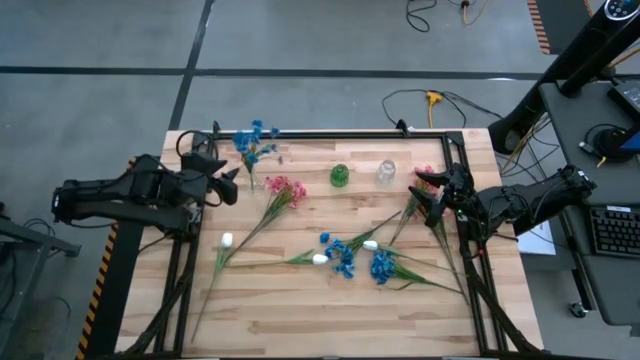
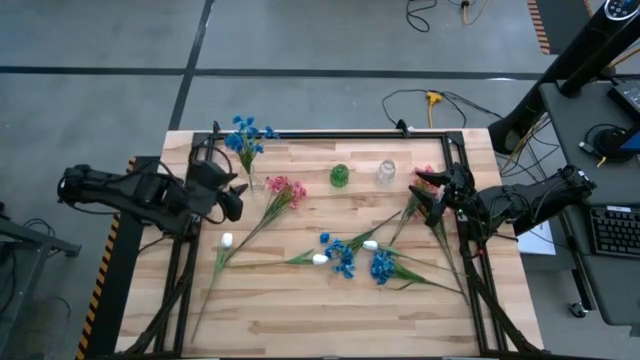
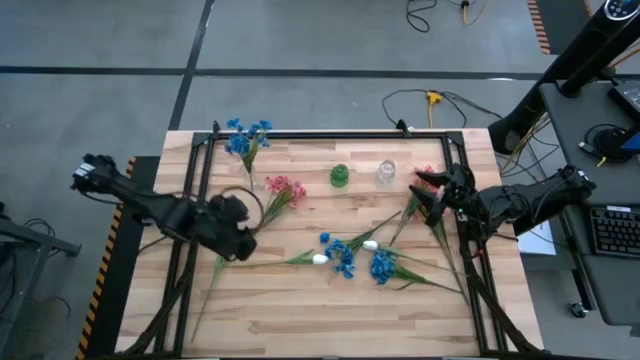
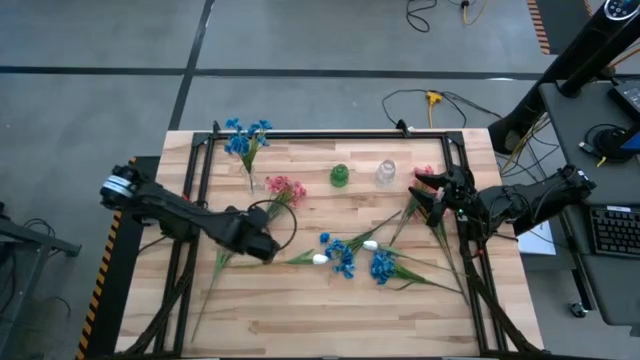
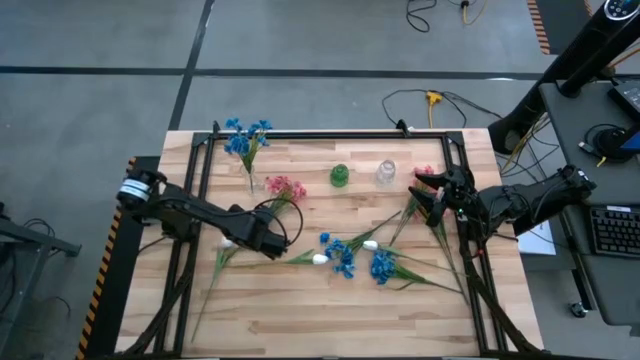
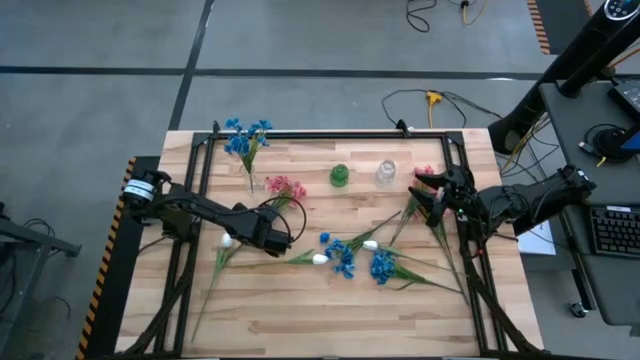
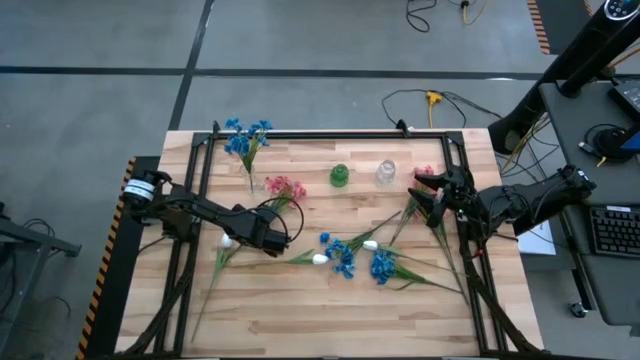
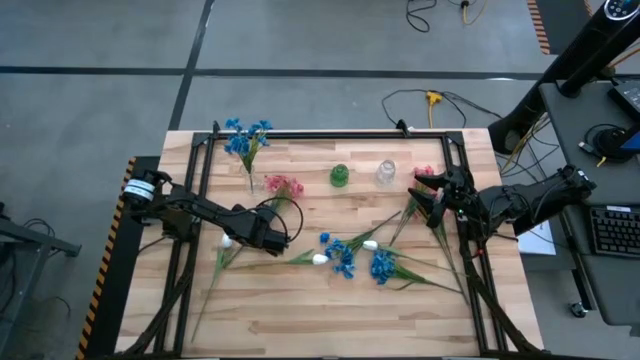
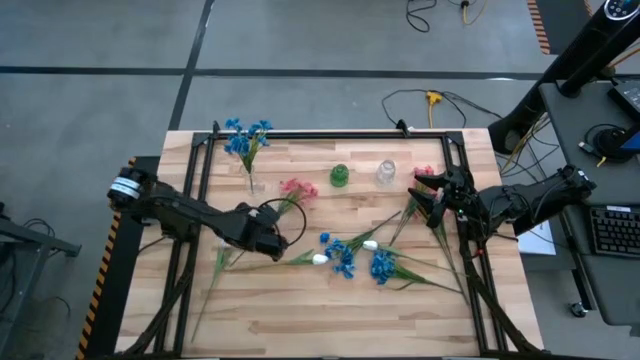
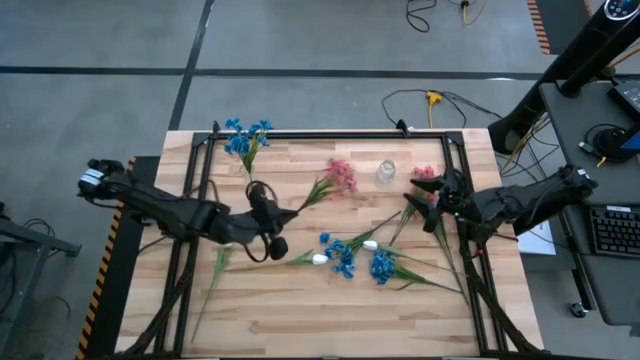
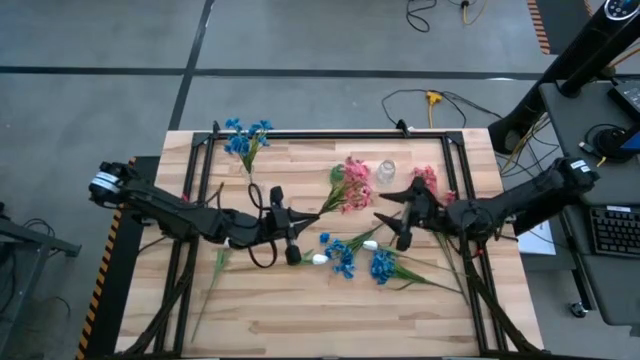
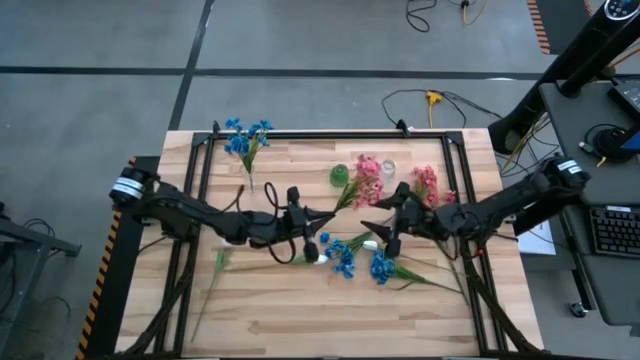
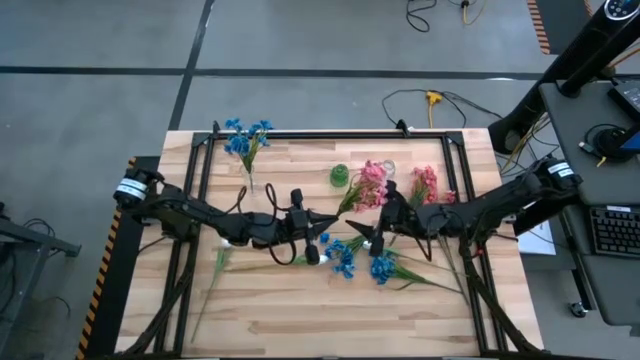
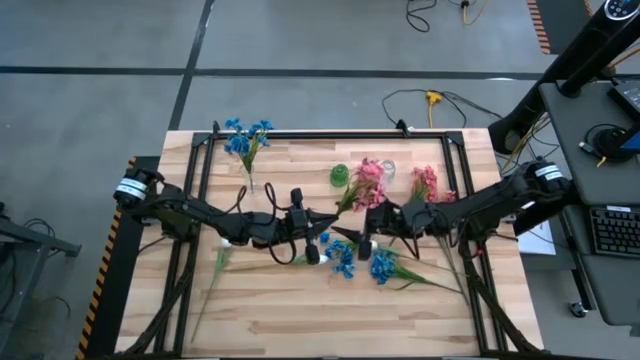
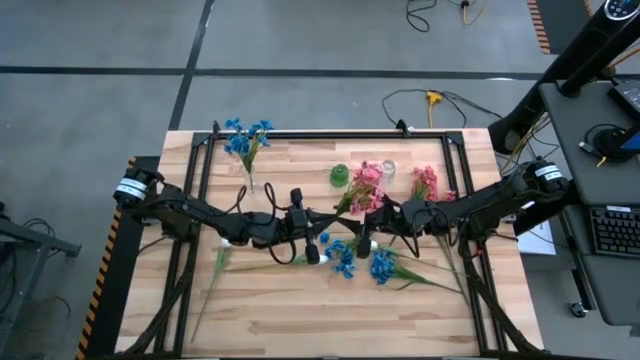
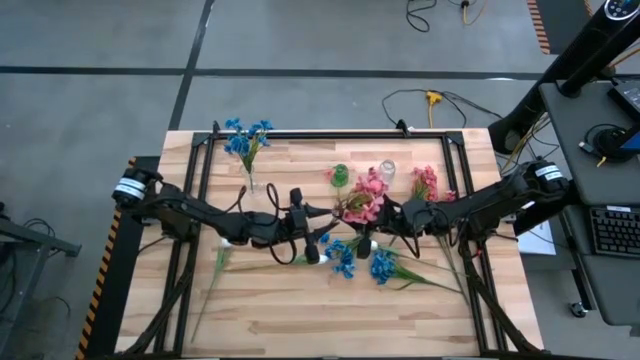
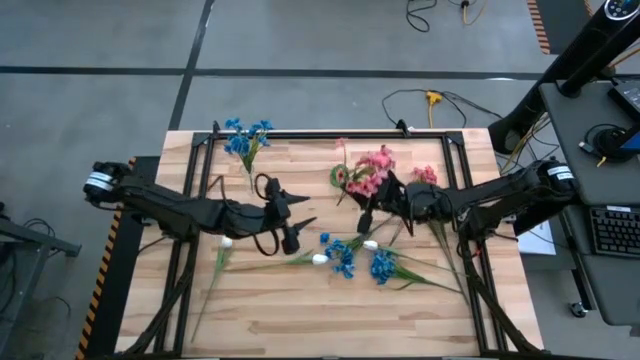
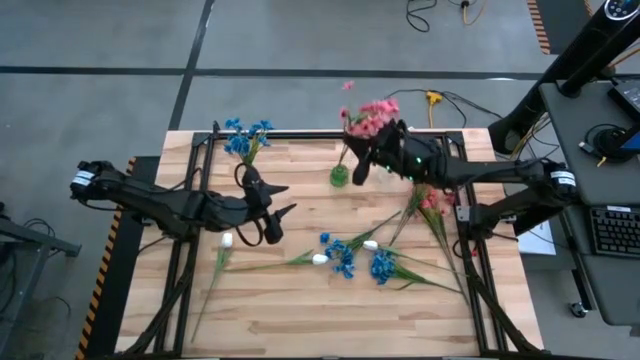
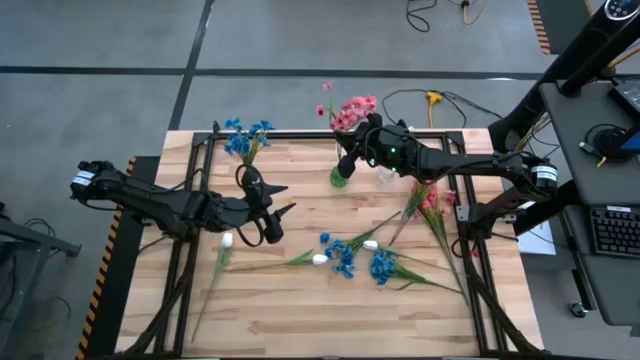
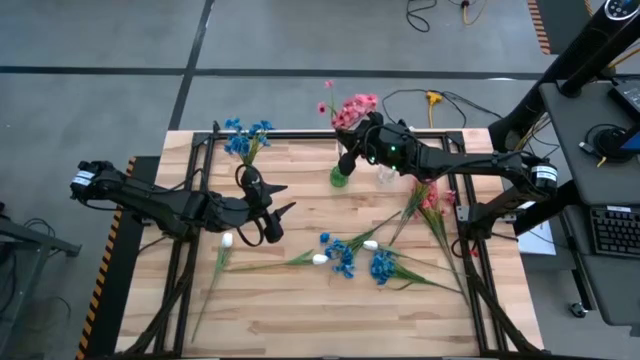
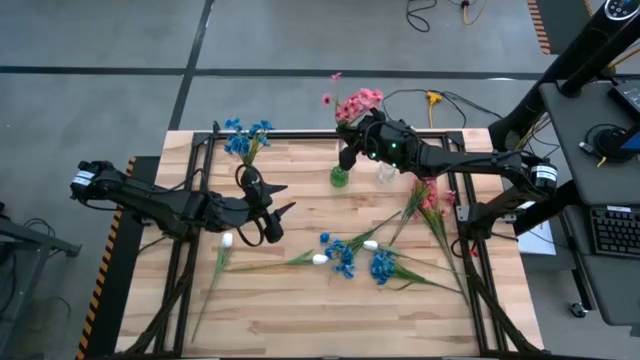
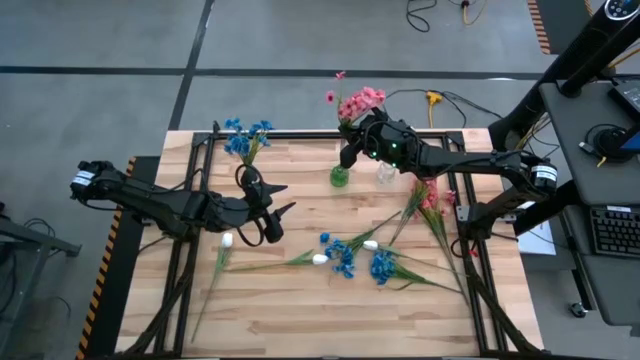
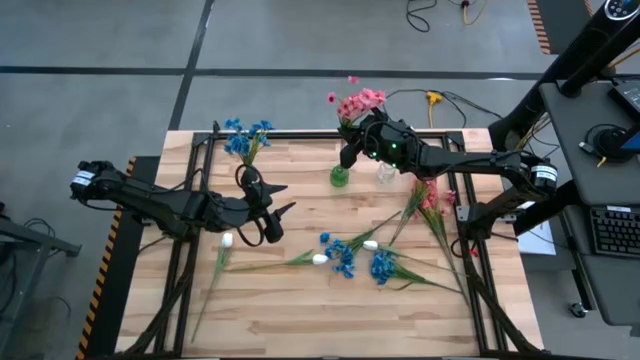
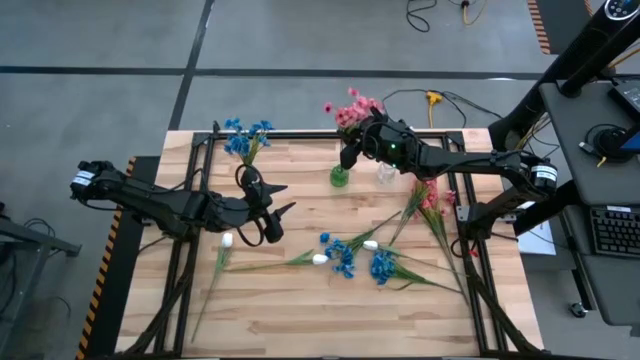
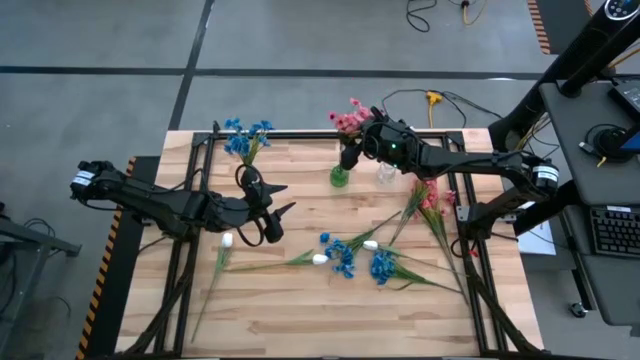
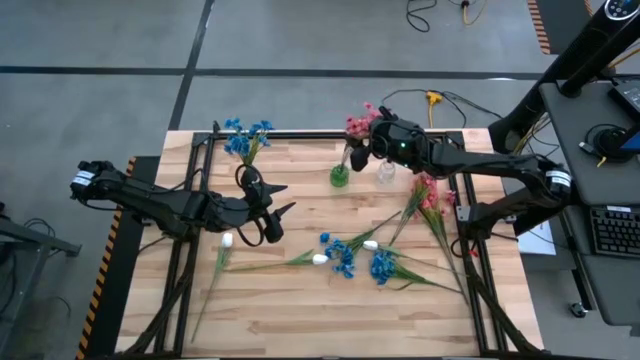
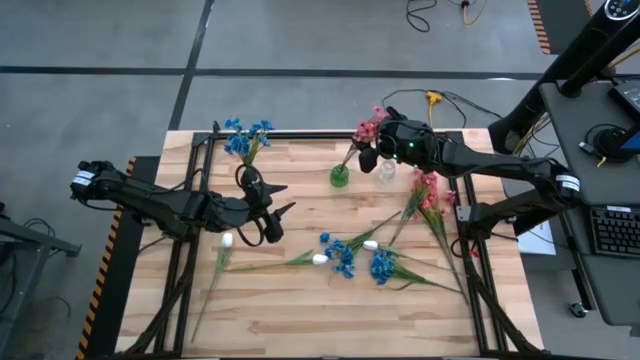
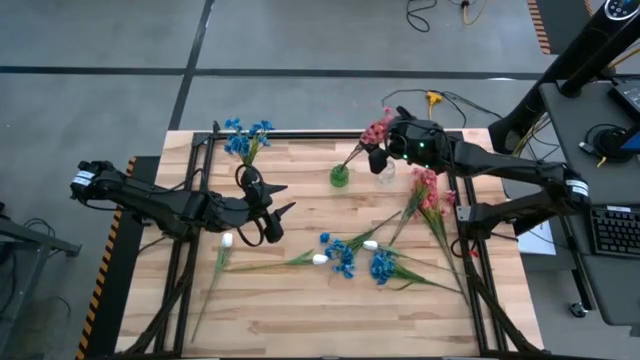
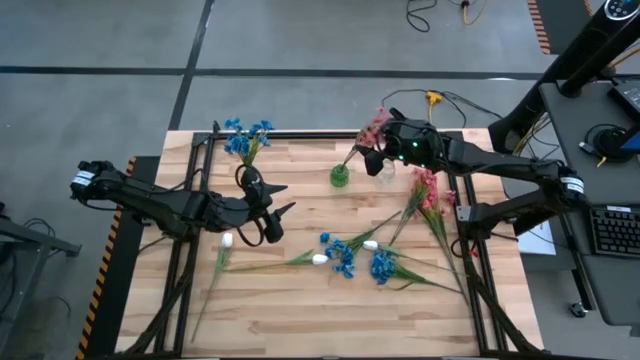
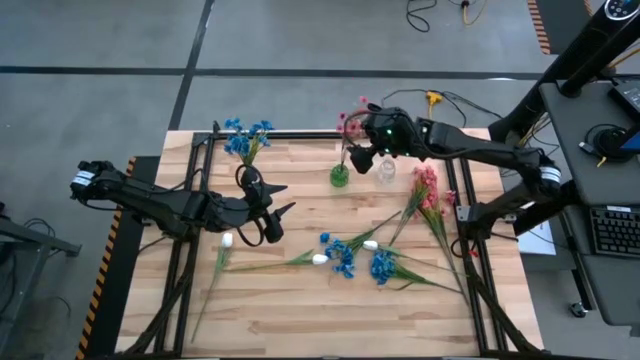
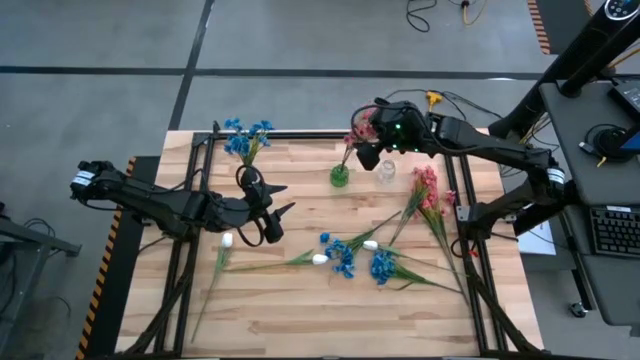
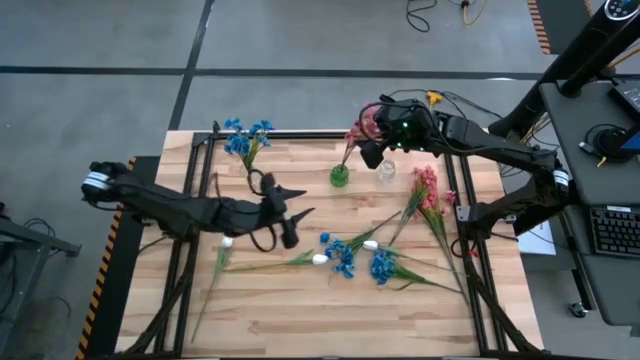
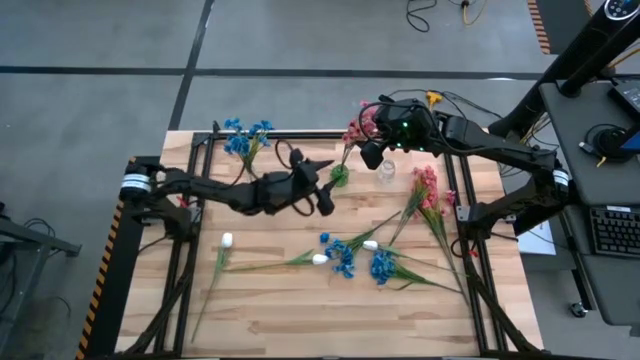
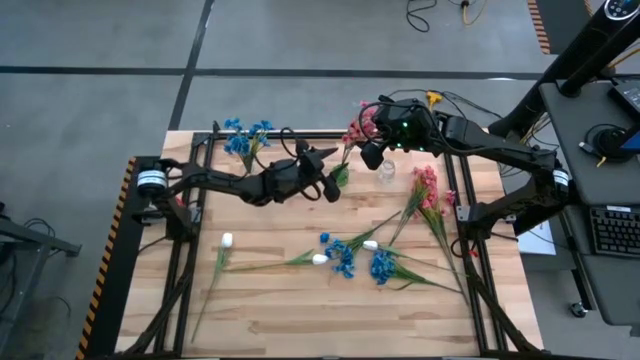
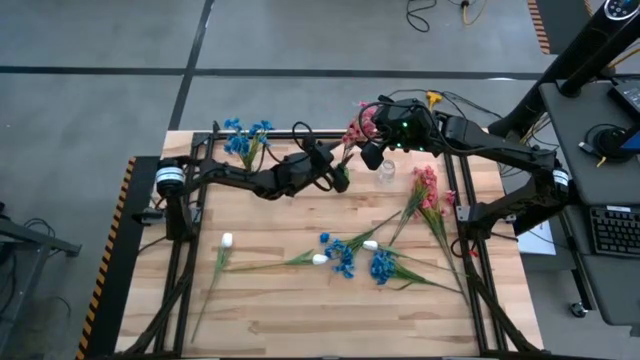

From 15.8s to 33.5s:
Task: Sort flowers into vase by color
Put the top left pink flowers into the green vase

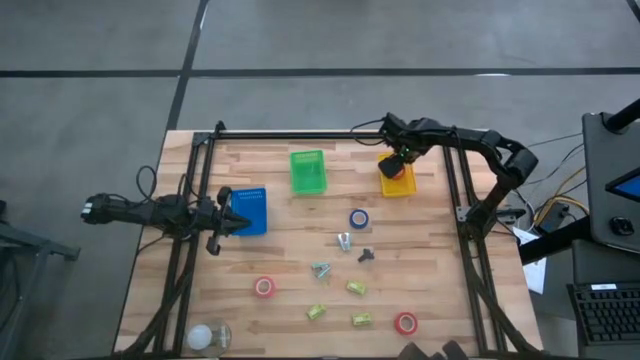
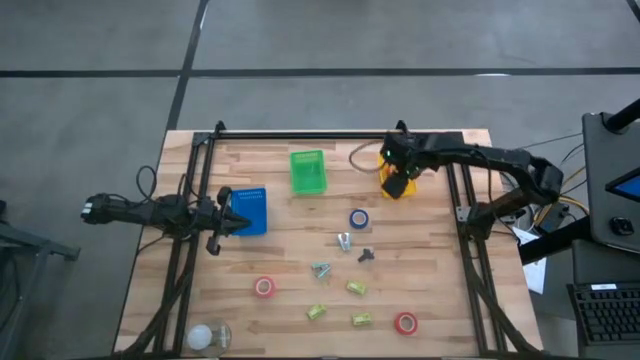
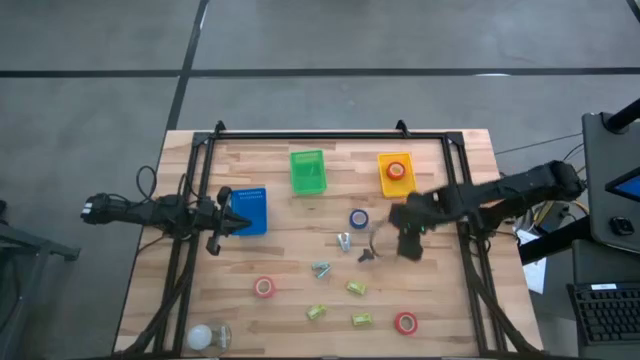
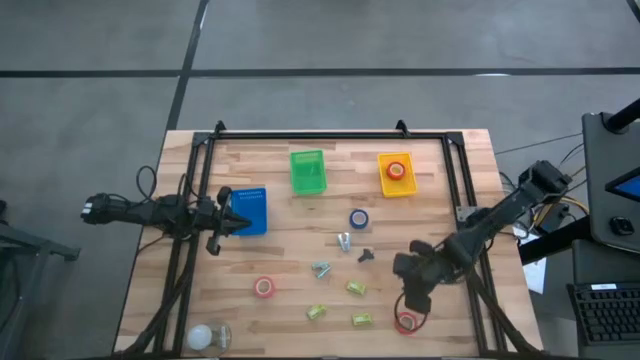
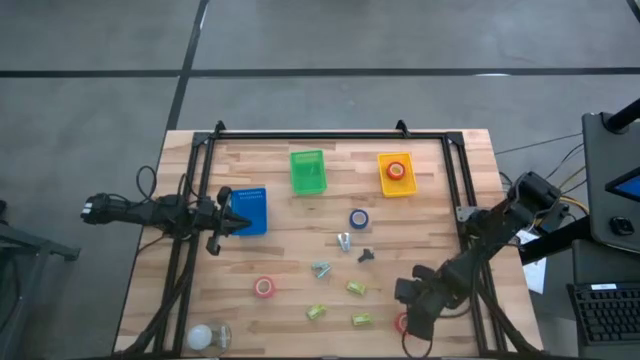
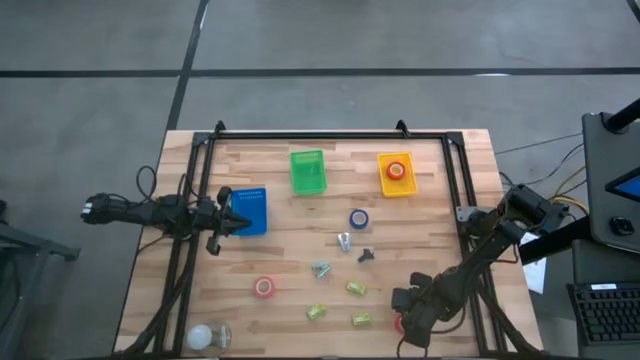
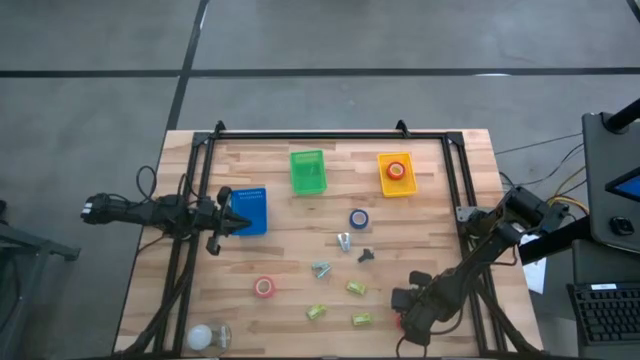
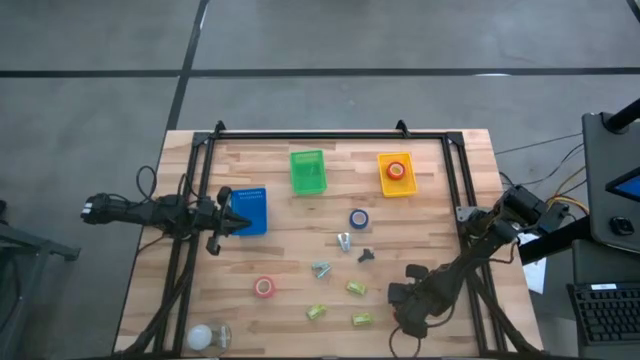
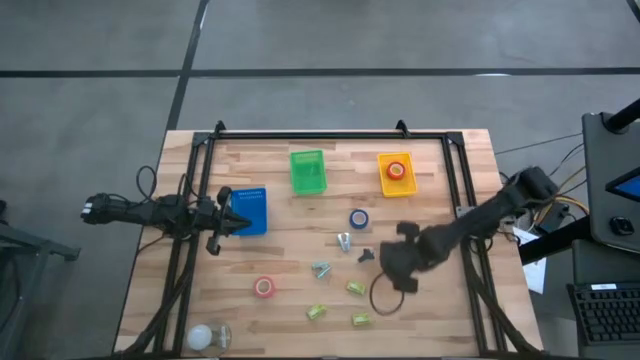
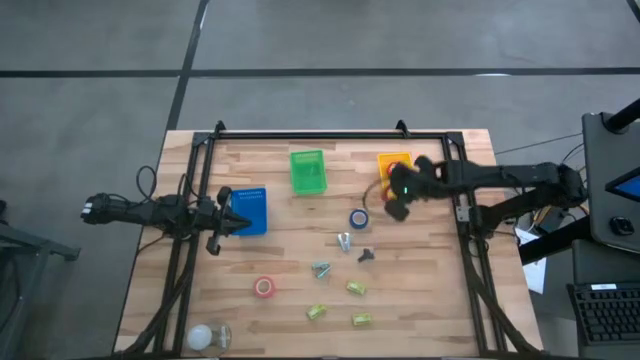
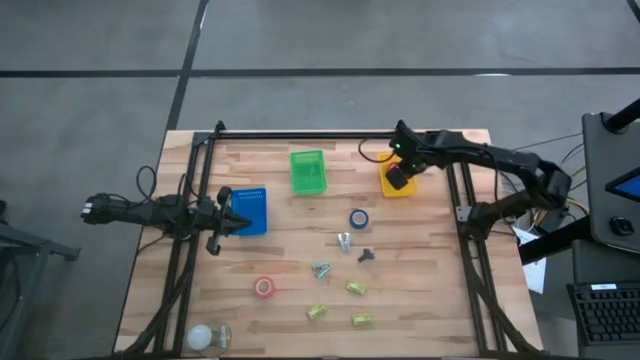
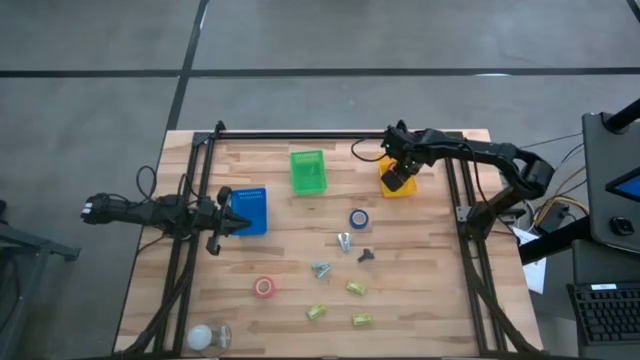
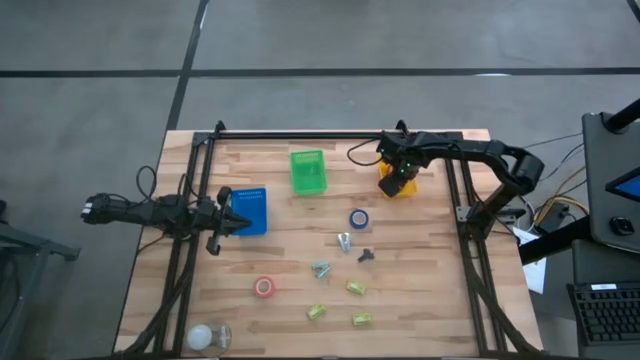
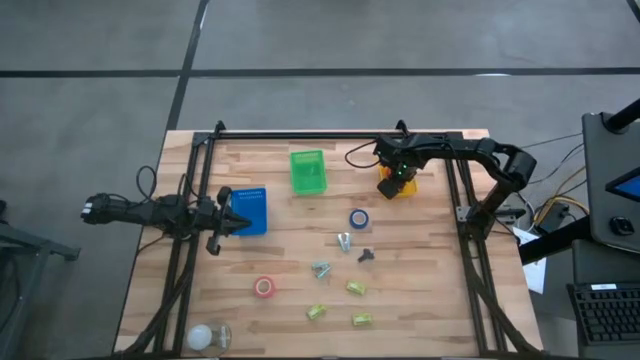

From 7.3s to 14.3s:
Task: Pick and place Stapler, Stapler remover, tape
Put the orange tape into the yellow bin
